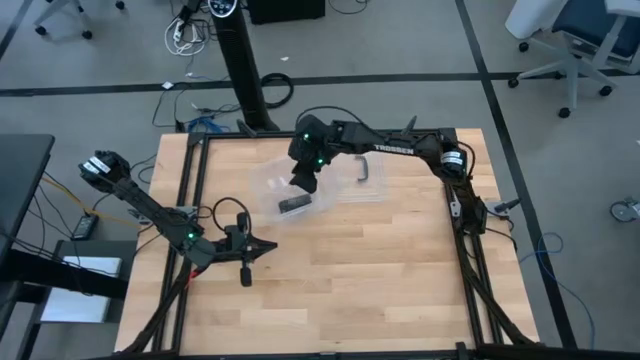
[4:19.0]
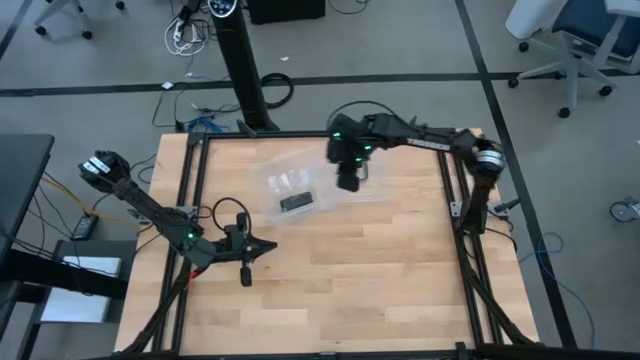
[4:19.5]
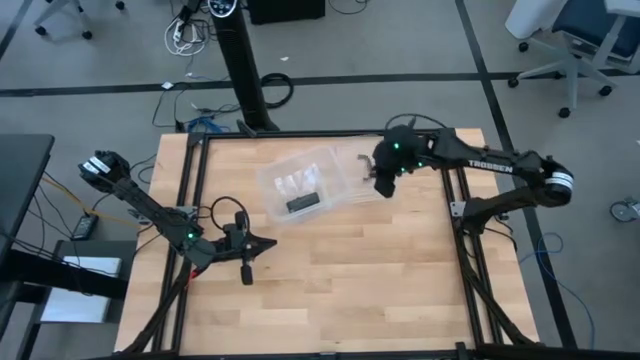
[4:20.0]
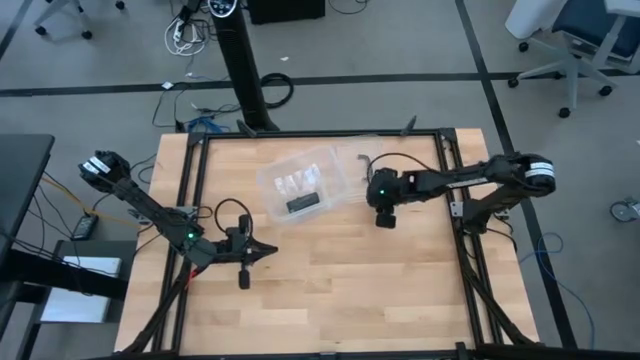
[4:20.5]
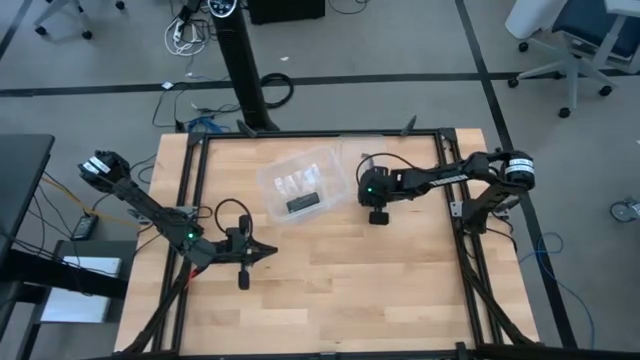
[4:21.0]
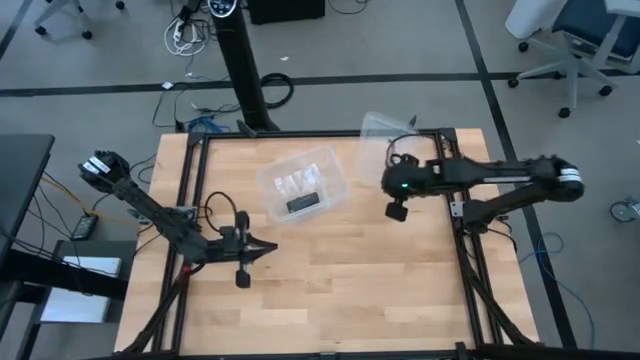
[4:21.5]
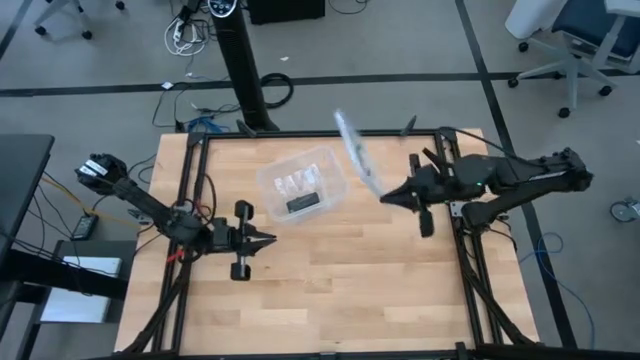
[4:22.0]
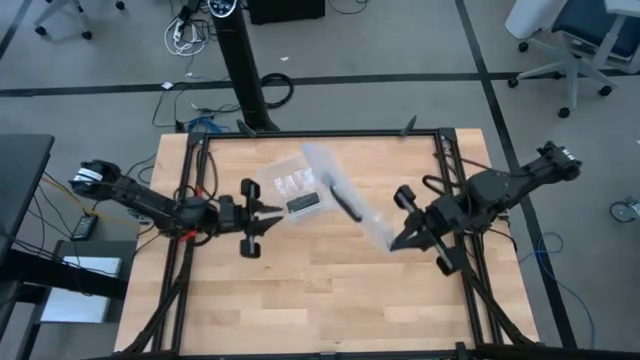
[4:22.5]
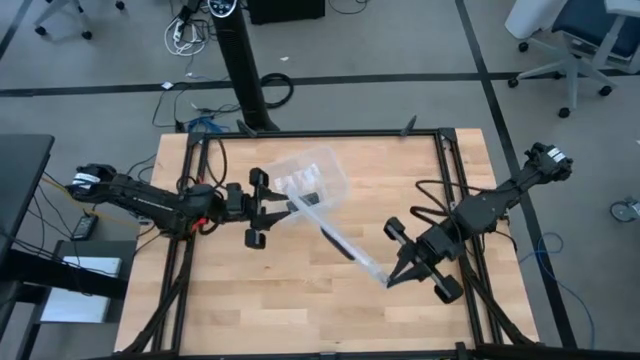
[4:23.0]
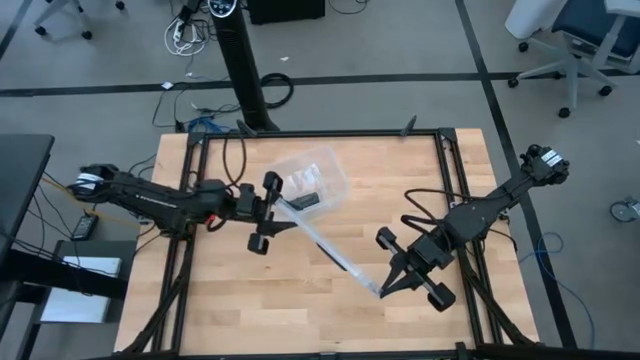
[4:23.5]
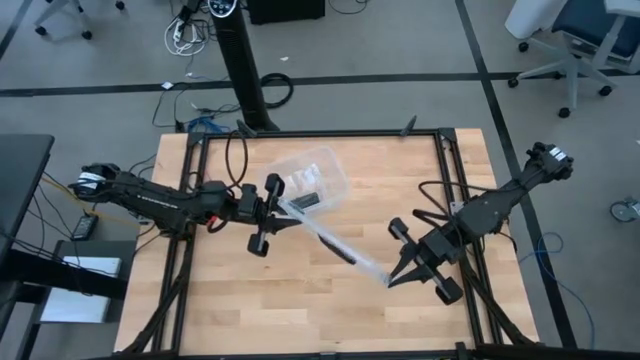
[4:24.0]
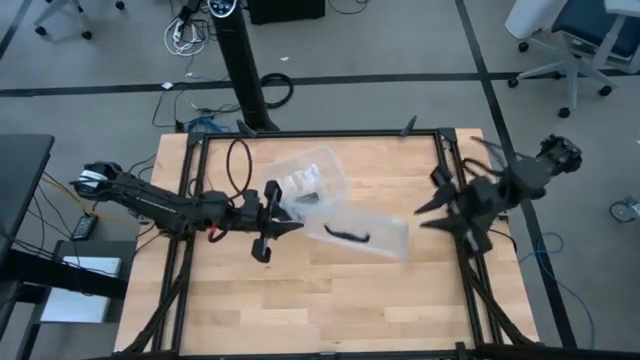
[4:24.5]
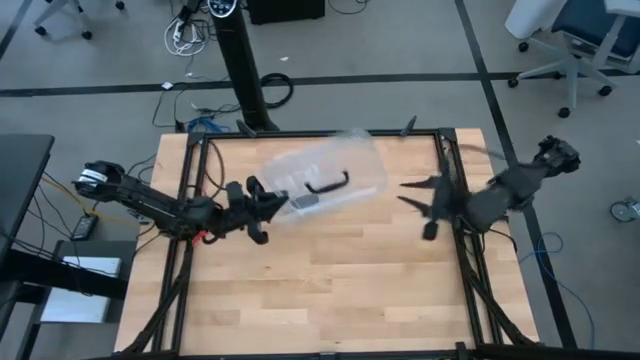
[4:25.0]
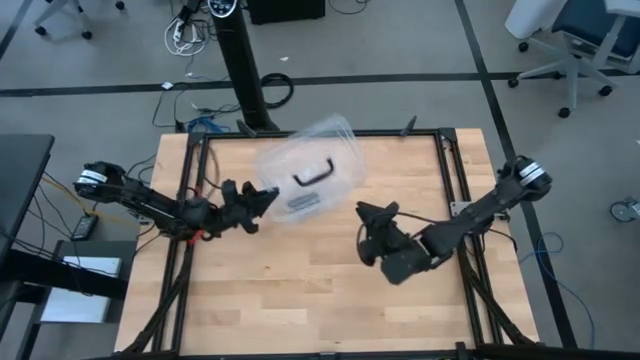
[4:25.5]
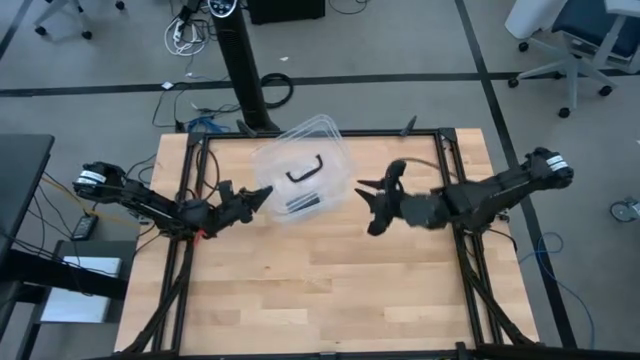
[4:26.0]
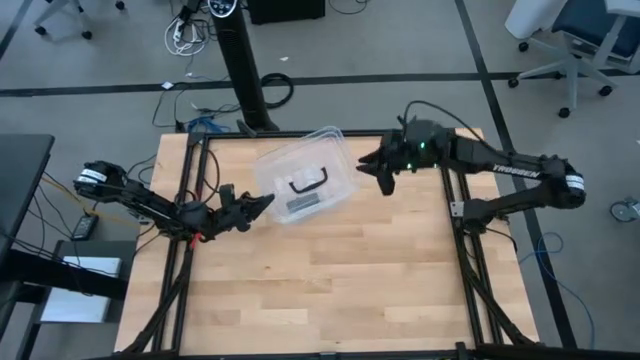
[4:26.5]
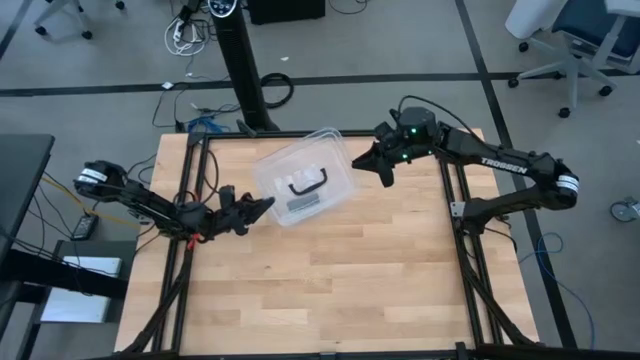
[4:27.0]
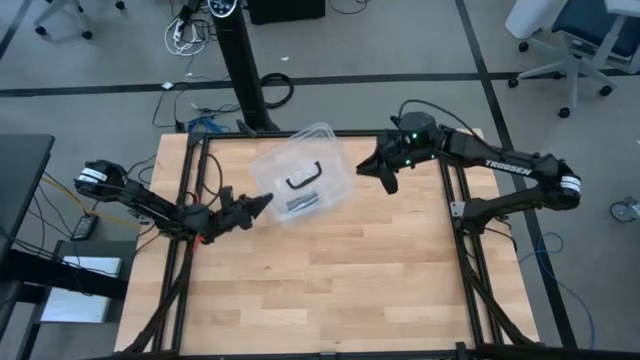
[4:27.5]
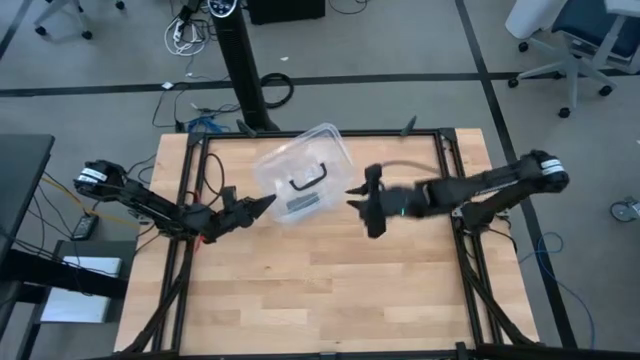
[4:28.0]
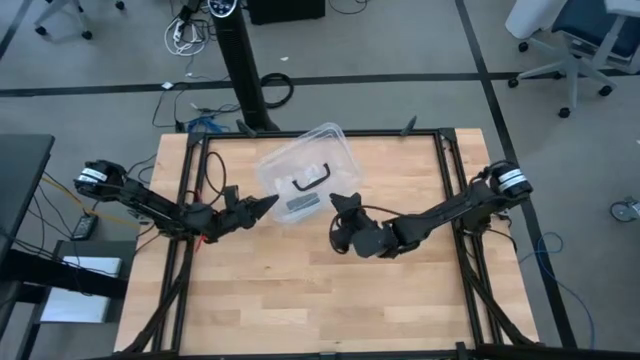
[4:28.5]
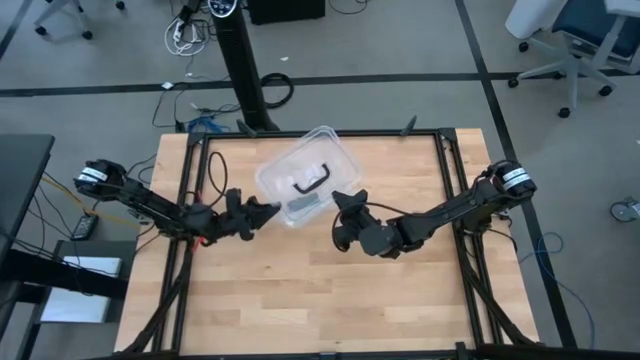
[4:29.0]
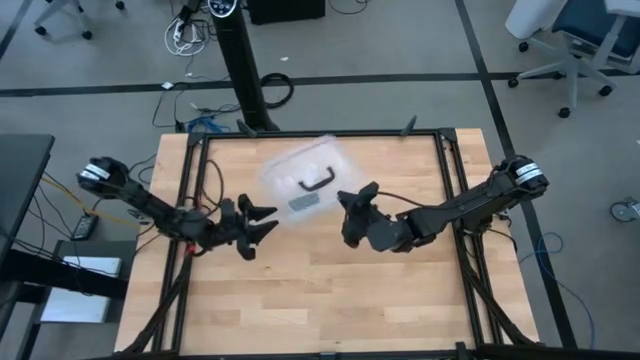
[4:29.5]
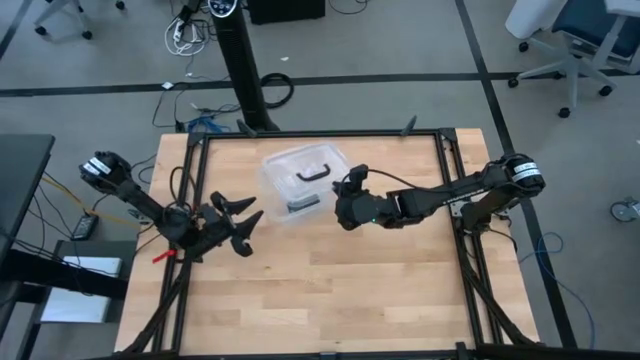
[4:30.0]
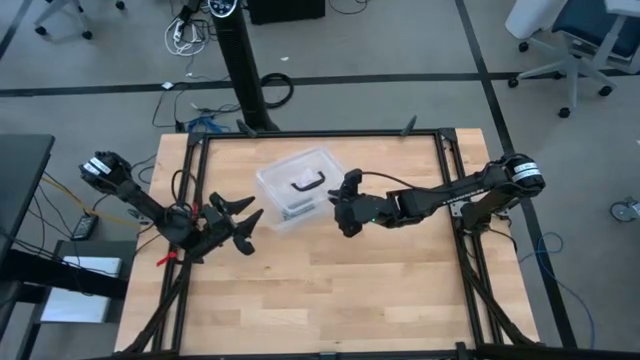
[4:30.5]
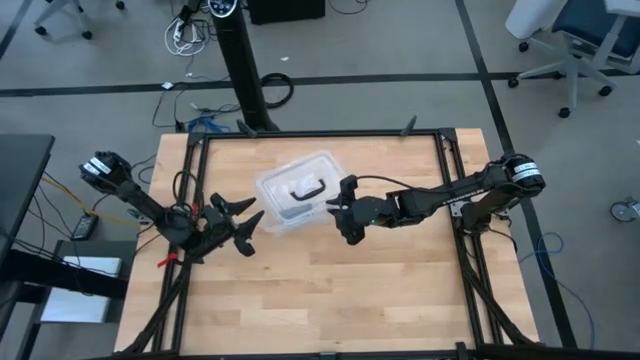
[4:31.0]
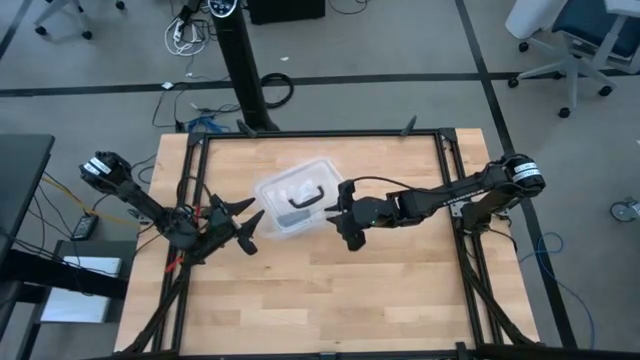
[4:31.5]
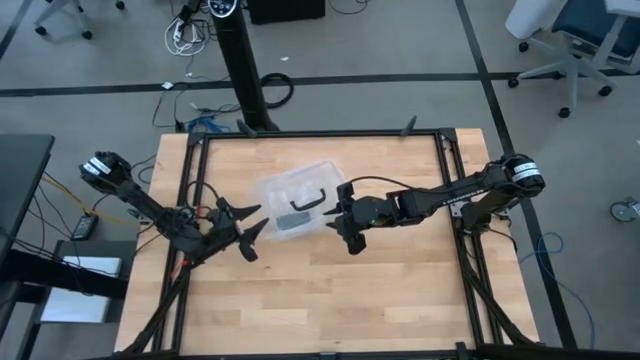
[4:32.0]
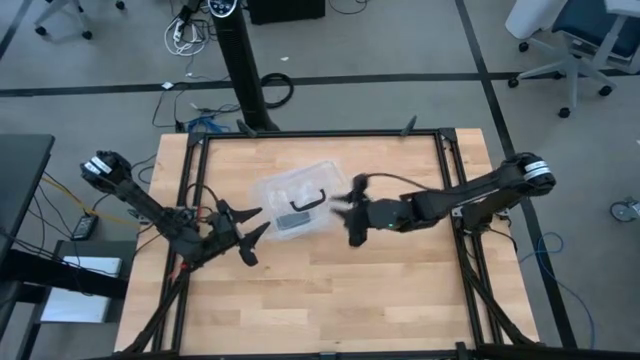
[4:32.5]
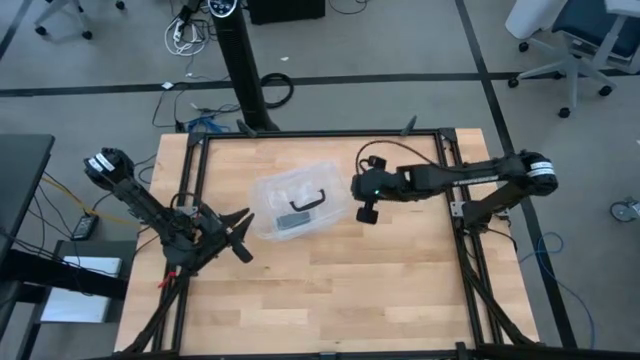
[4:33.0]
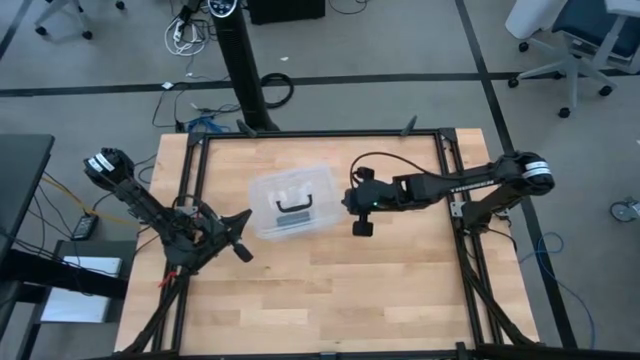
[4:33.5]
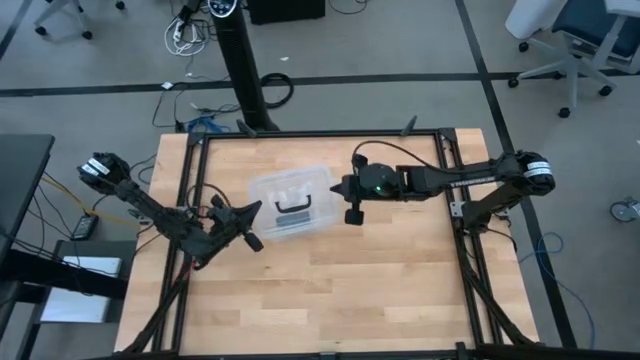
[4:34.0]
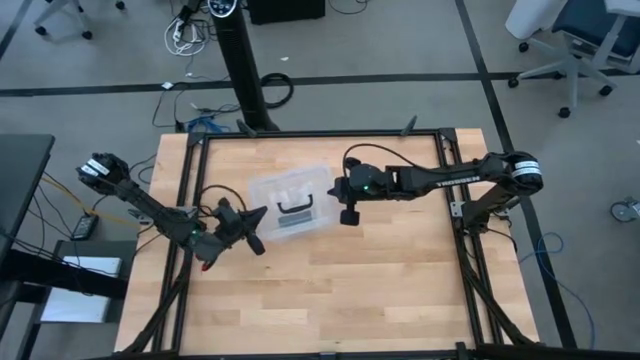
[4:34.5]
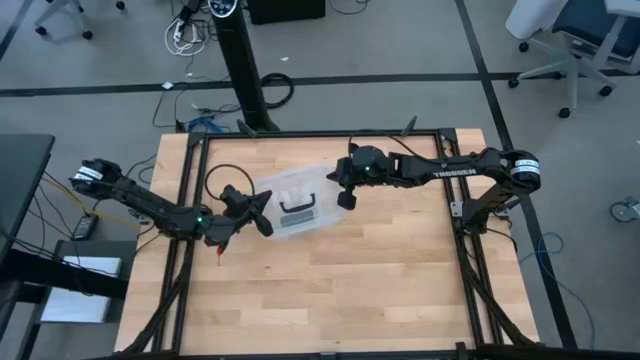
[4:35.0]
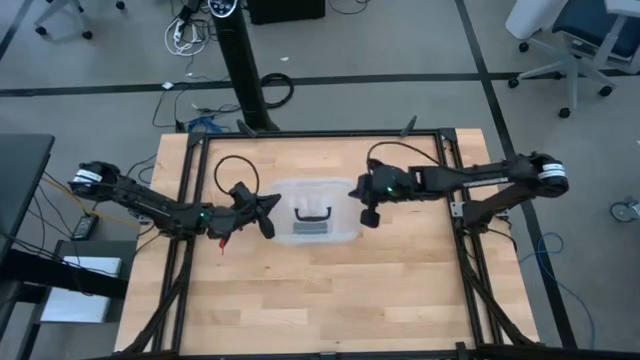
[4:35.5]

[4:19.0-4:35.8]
Task: Roll bandage
Close the transparent bin

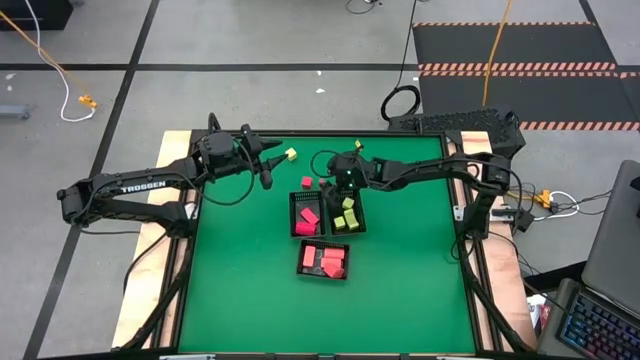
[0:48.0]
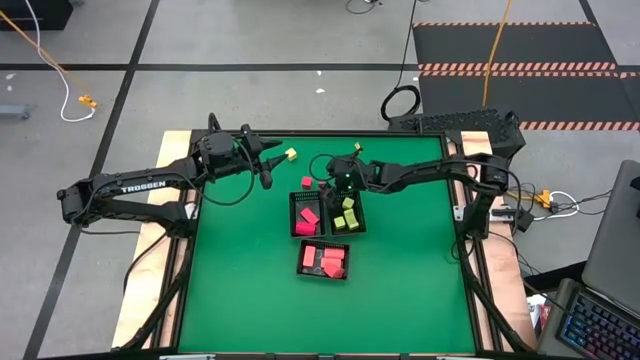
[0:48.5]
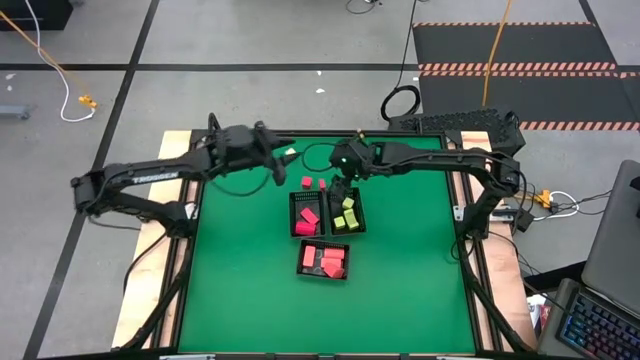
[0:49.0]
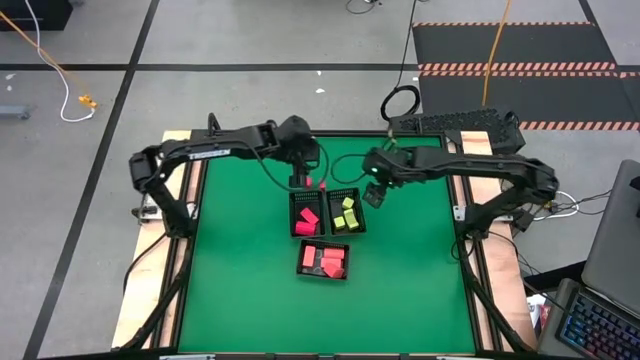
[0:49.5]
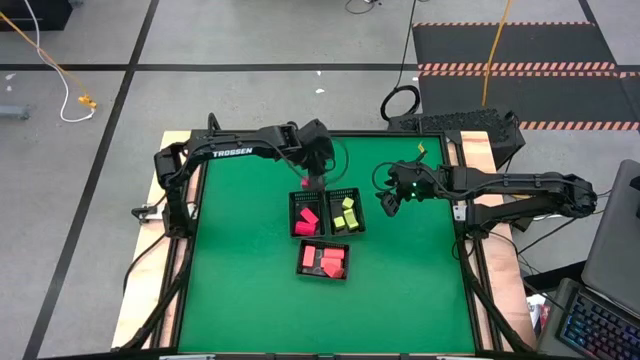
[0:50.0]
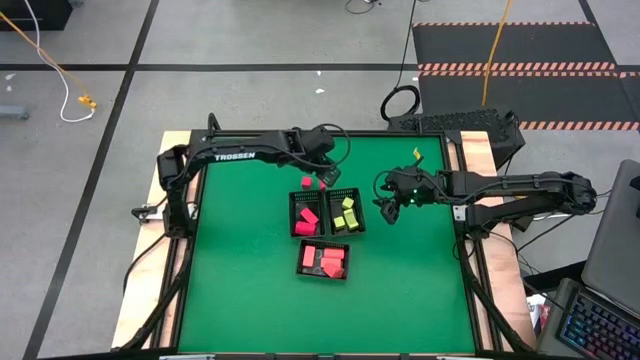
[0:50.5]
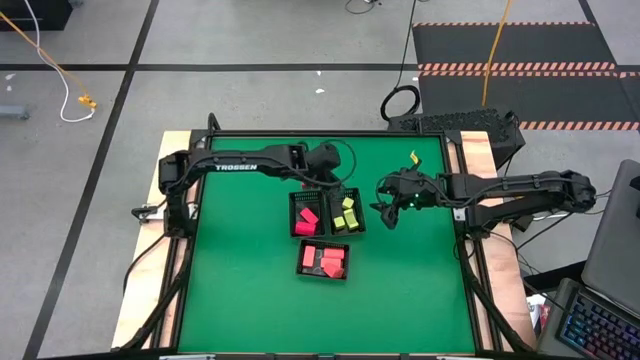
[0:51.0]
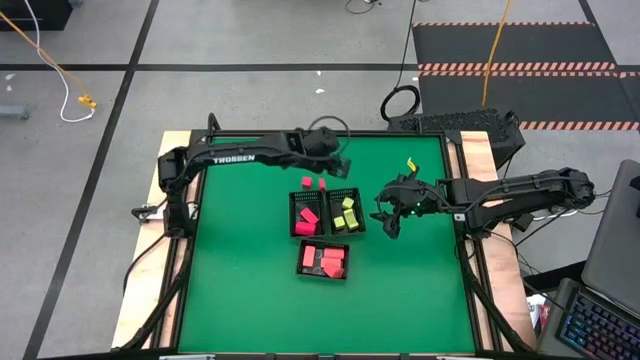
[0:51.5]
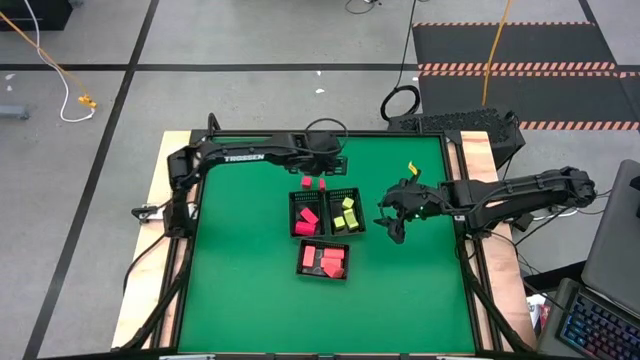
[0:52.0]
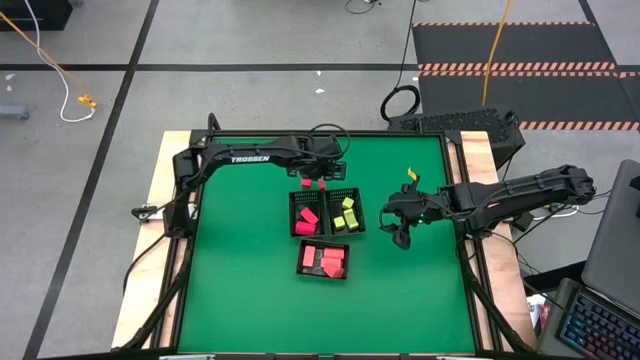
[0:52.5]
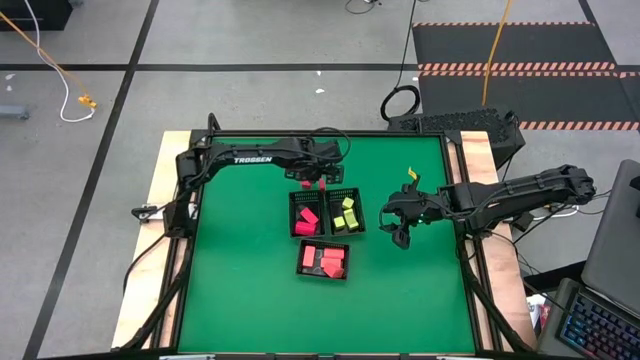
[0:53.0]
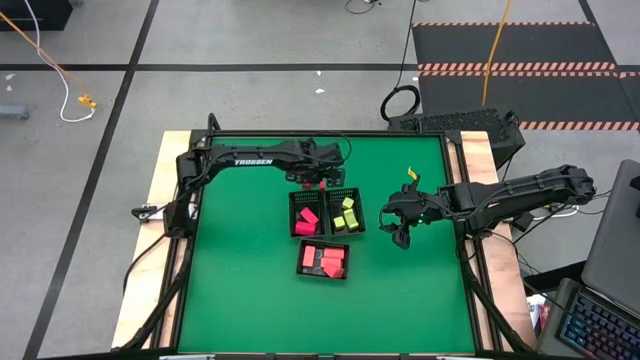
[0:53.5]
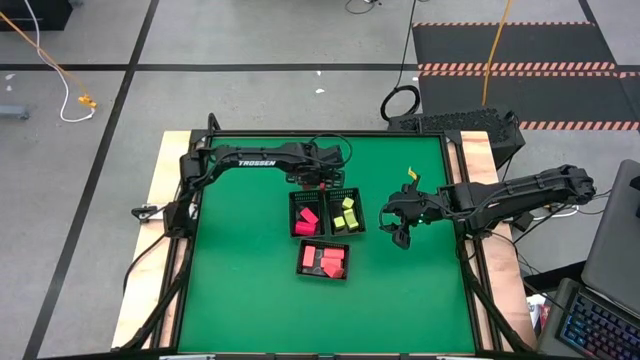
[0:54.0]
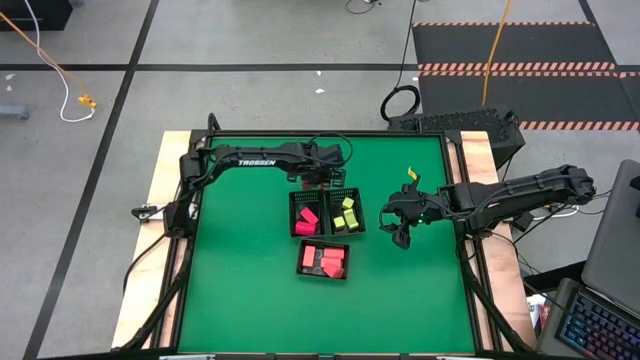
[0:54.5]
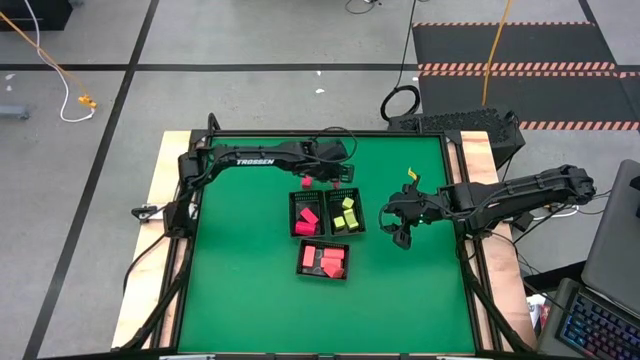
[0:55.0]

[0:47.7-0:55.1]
Task: Sort & place blocks by color
Put the red block into the top left black bin
